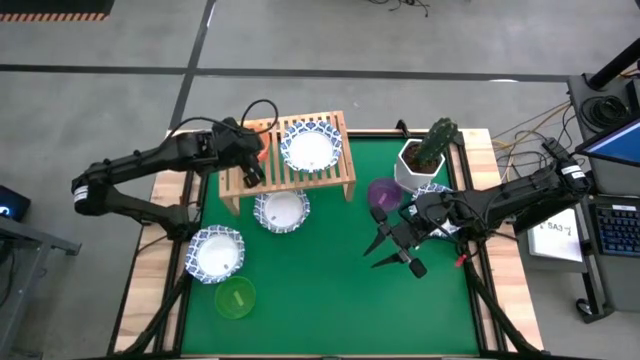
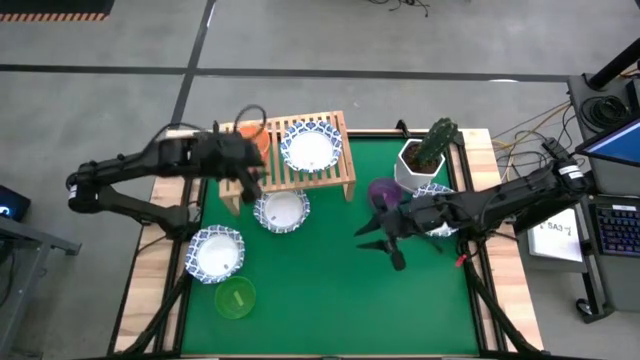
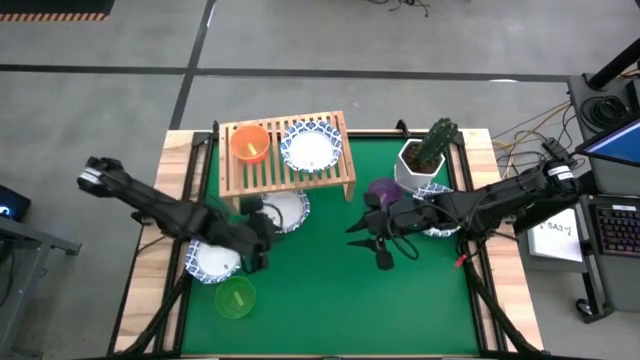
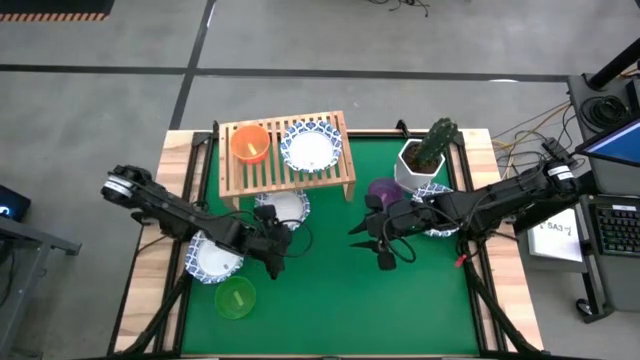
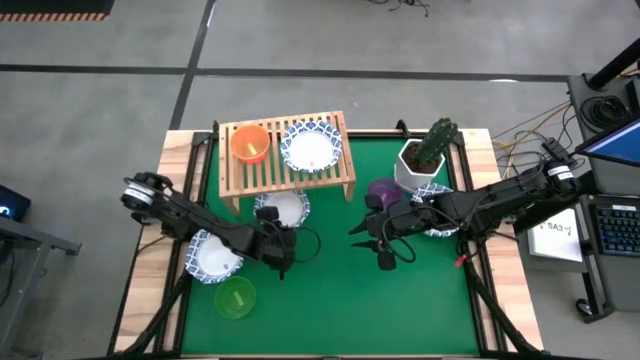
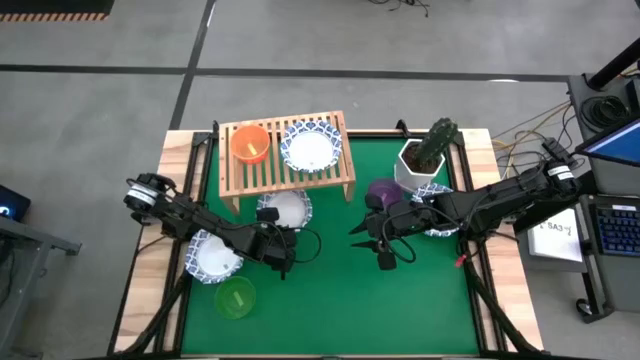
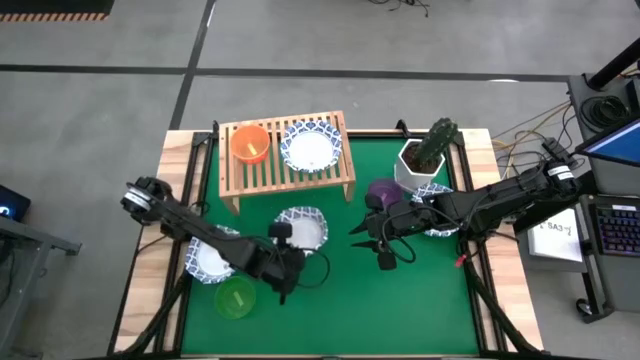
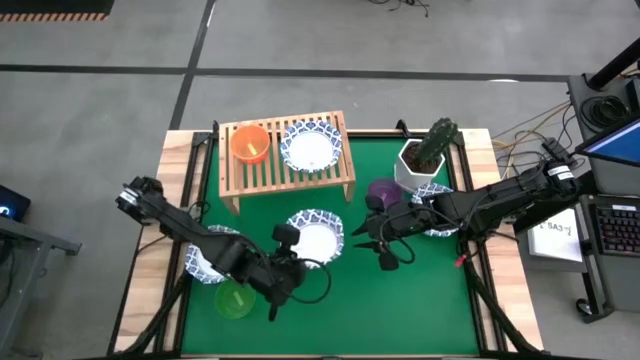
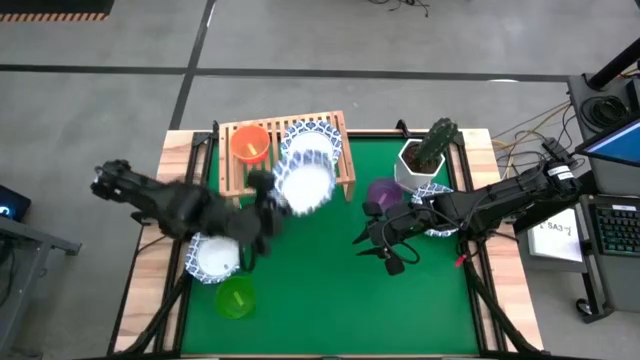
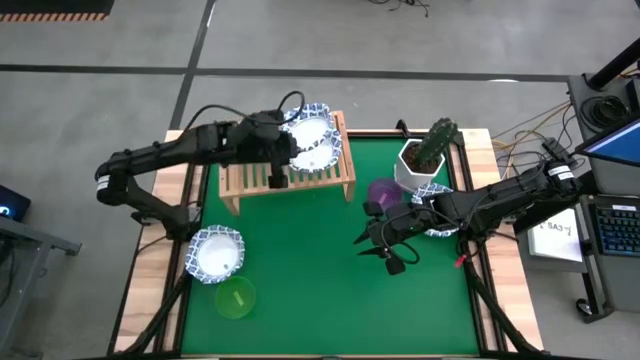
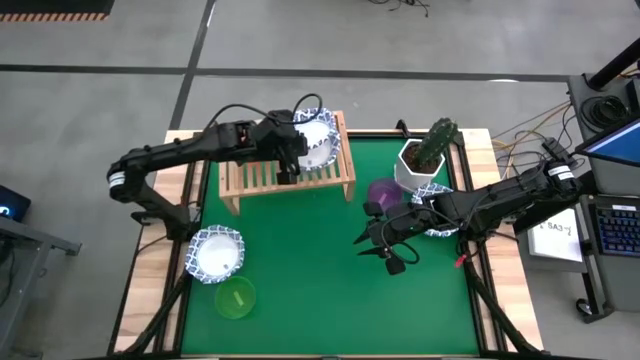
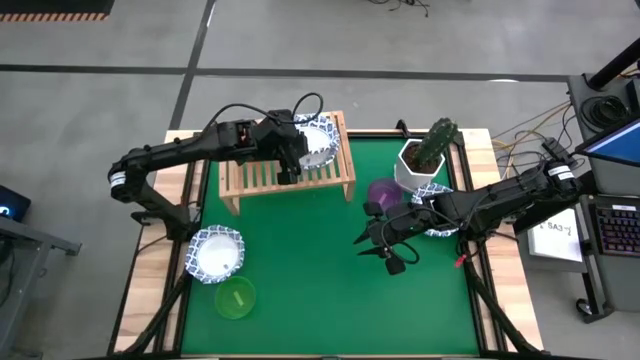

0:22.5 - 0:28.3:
Task: Place and stack bowls onto a shelf
Stack the middle white blue bowl on top of the white blue bowl on the shelf

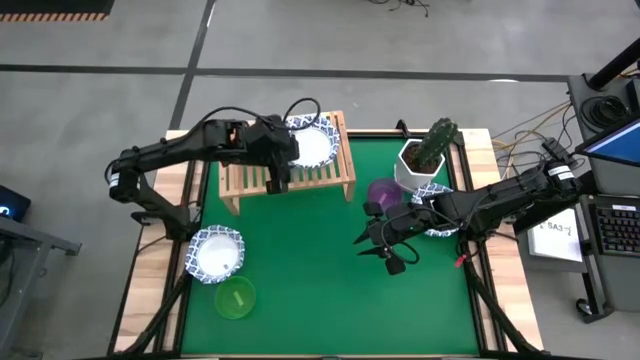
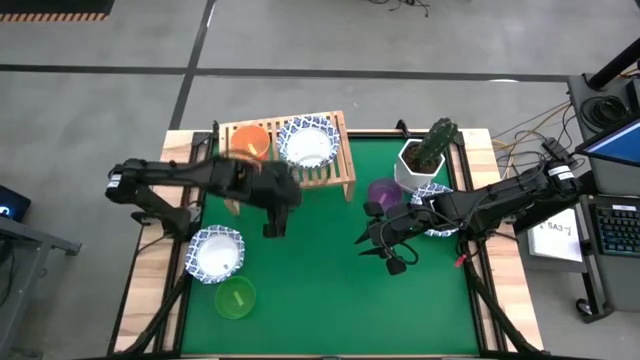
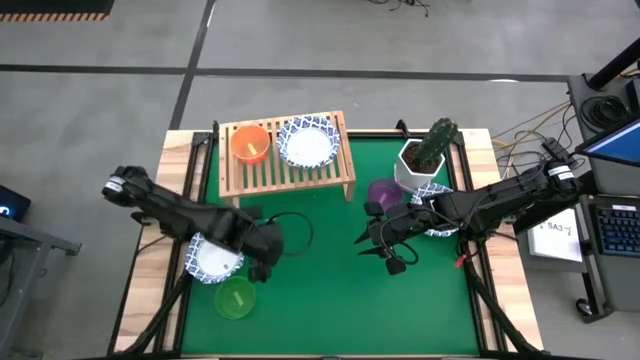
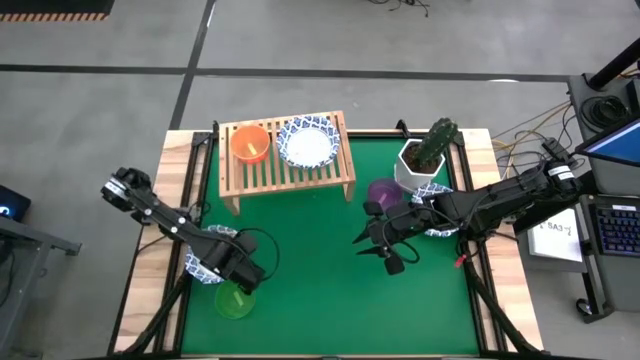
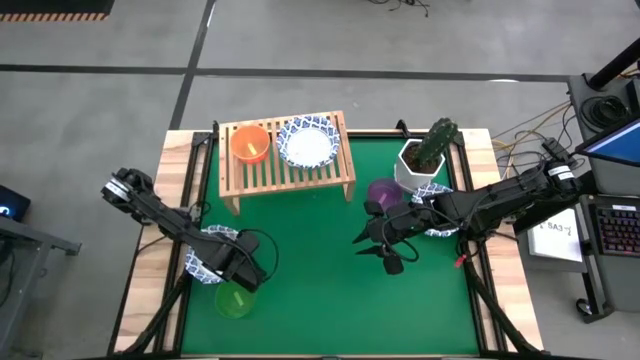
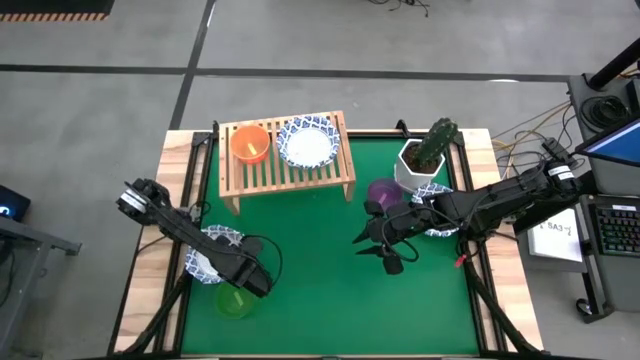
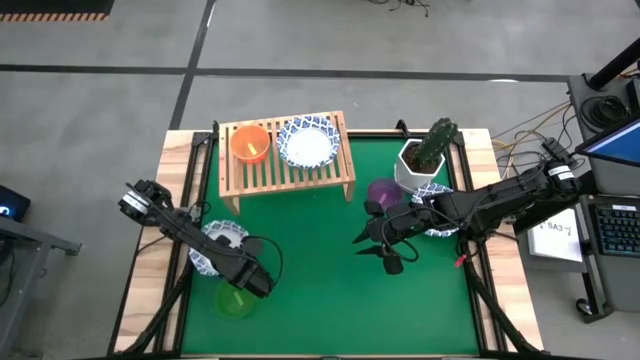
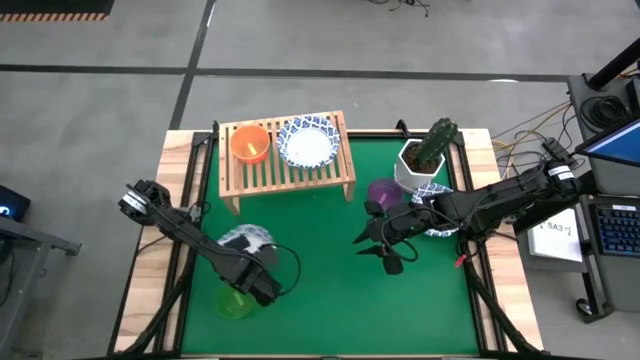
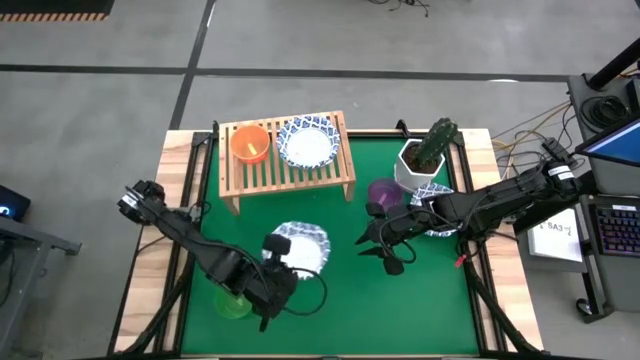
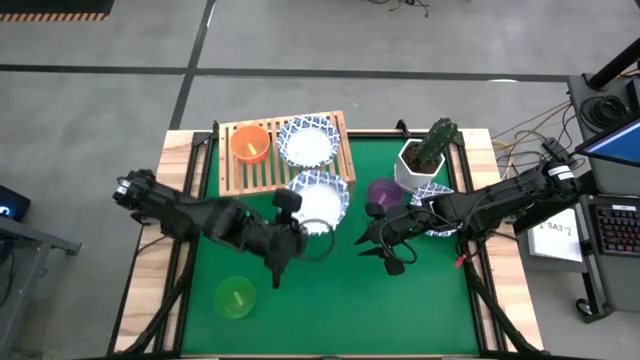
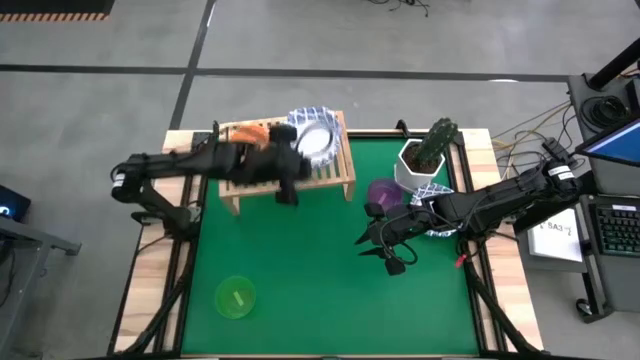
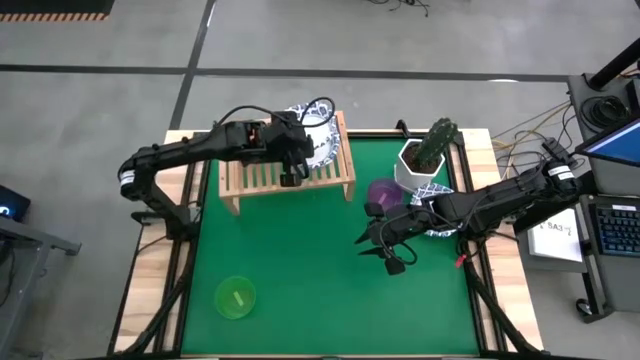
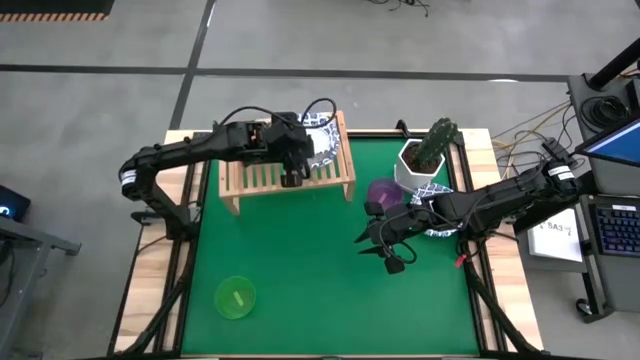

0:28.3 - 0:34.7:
Stack the left white blue bowl on top of the white blue bowl on the shelf

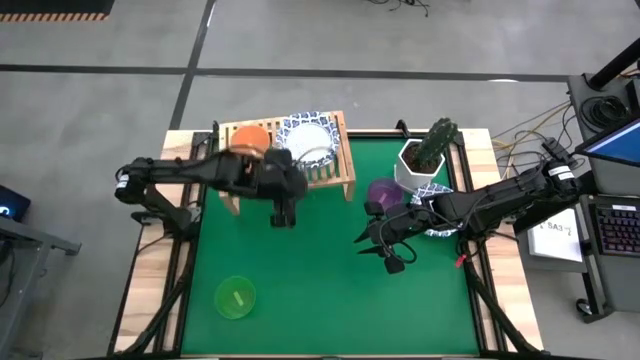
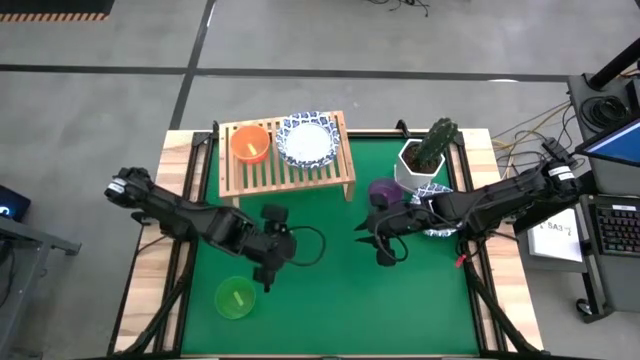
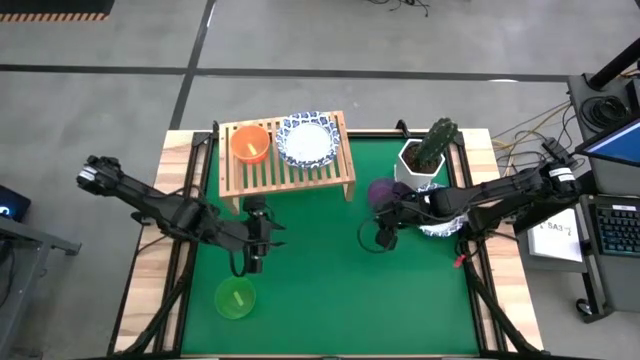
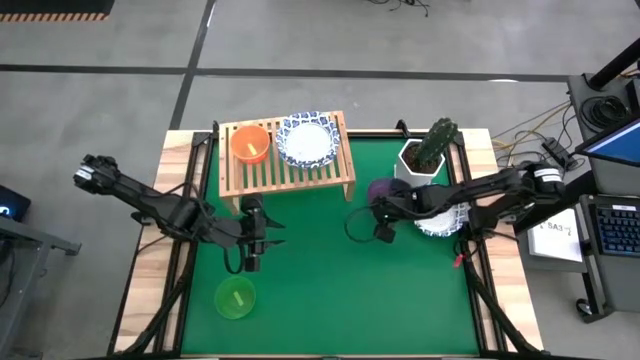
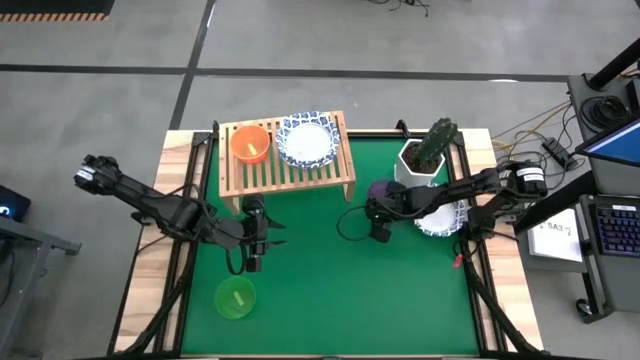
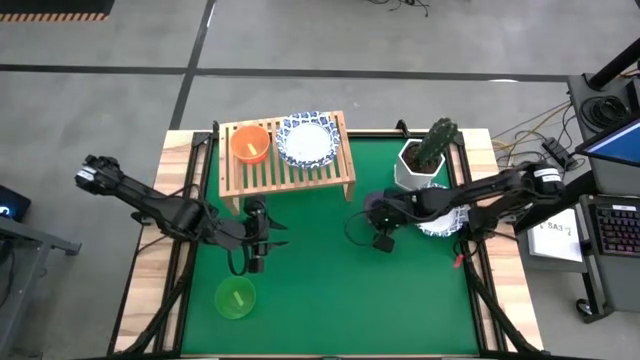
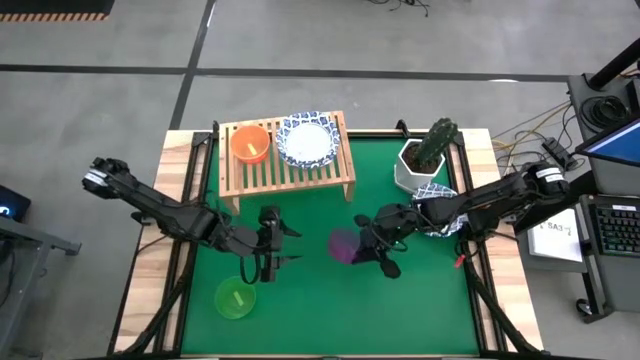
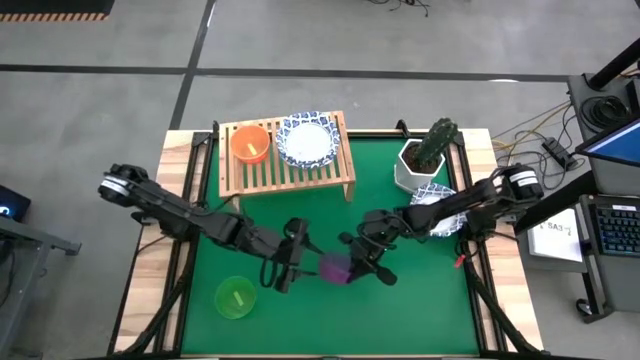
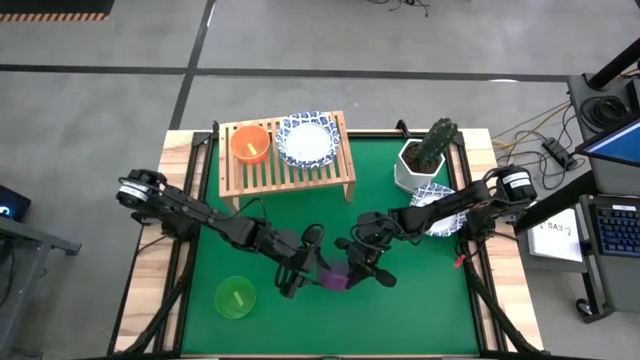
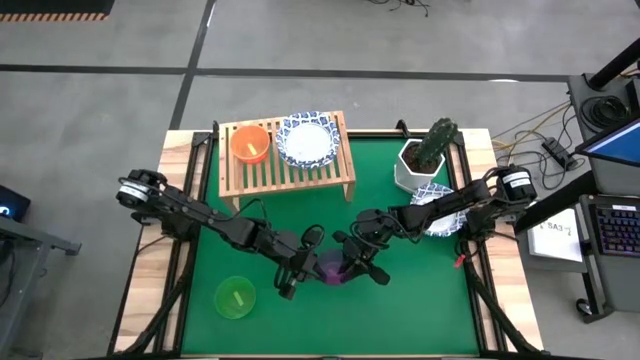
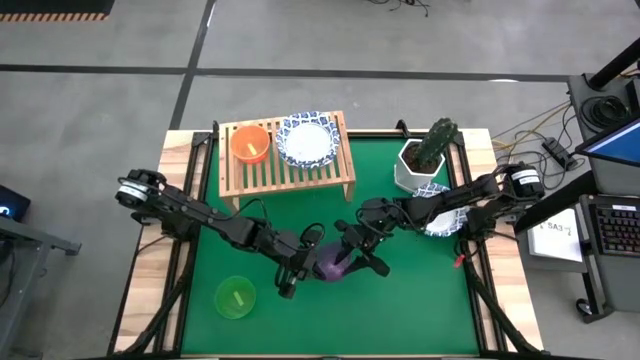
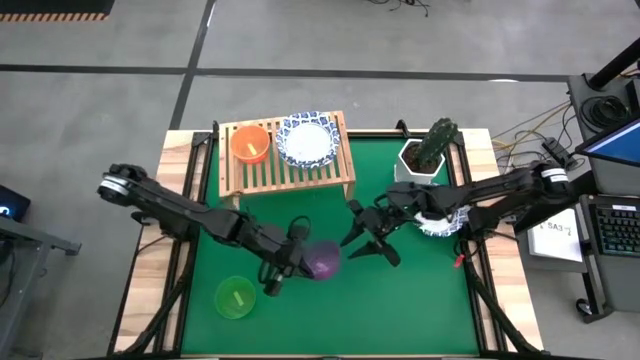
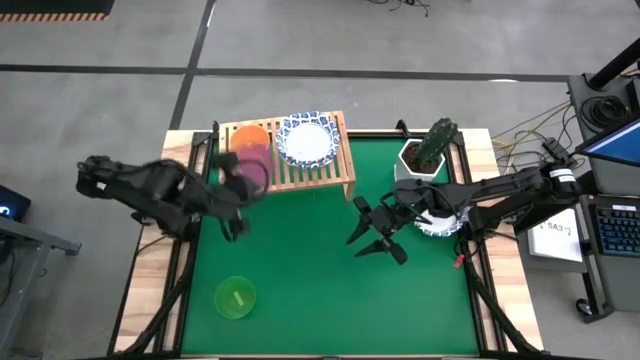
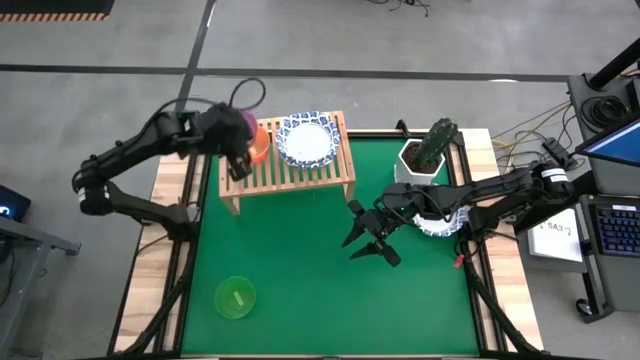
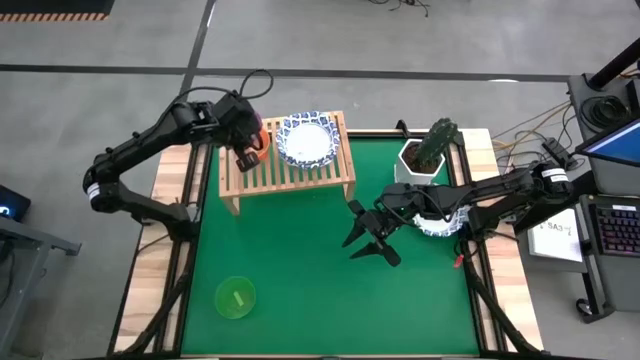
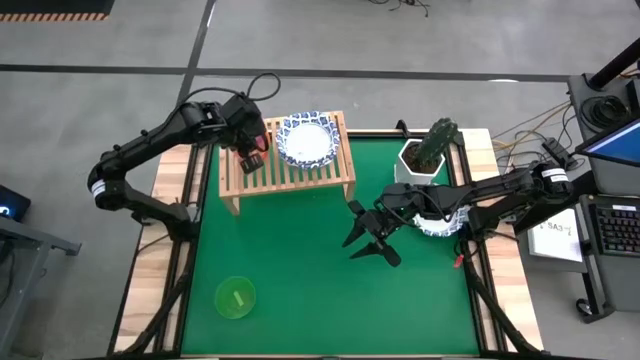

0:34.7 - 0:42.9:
Stack the purple bowl on top of the yellow bowl on the shelf
